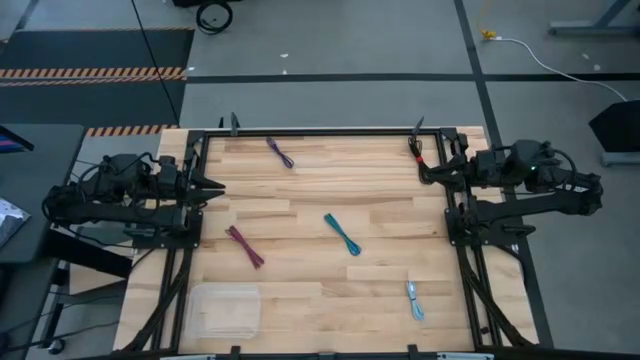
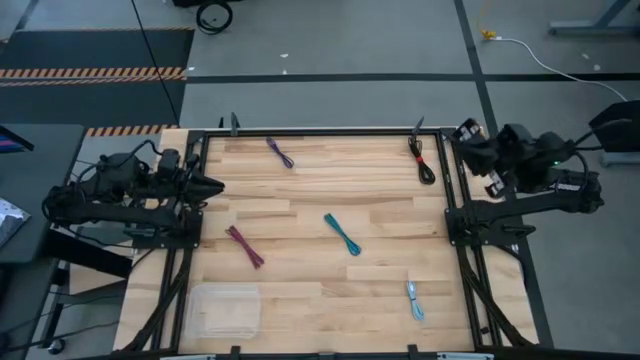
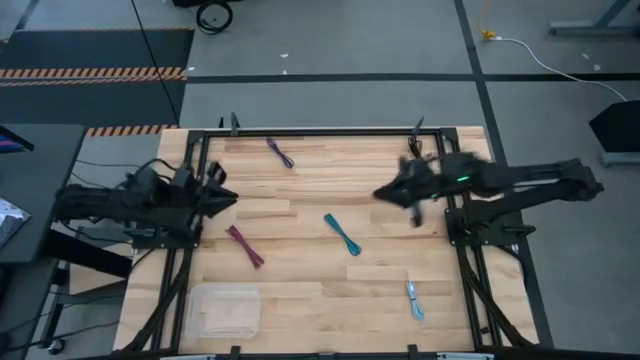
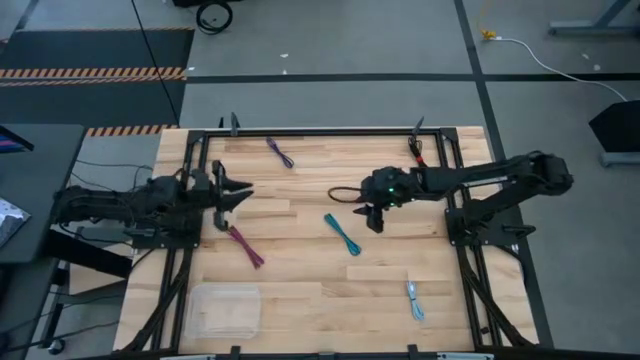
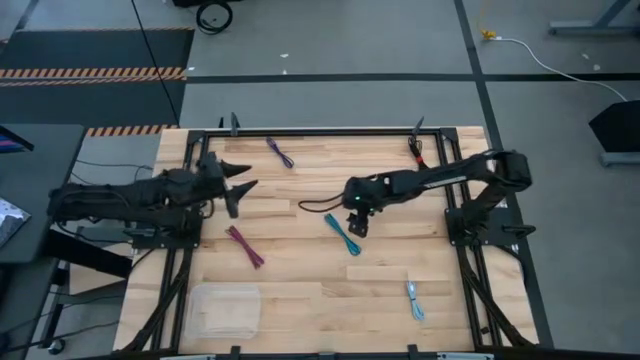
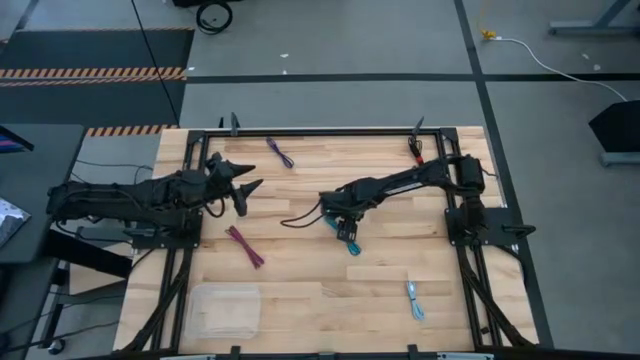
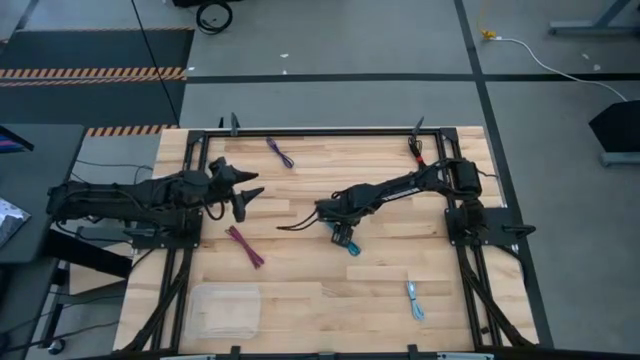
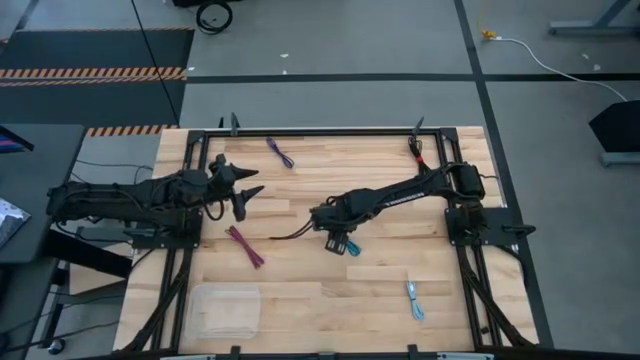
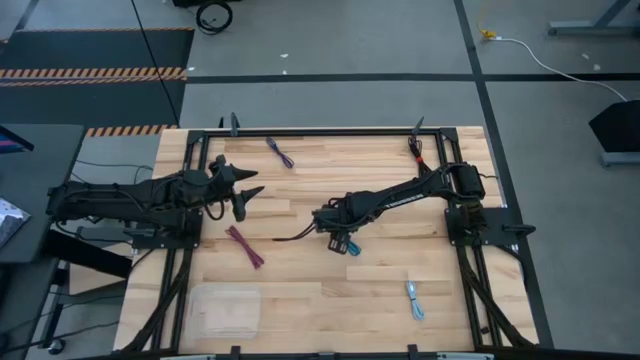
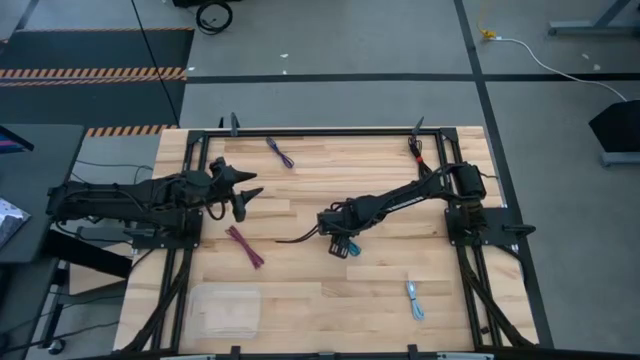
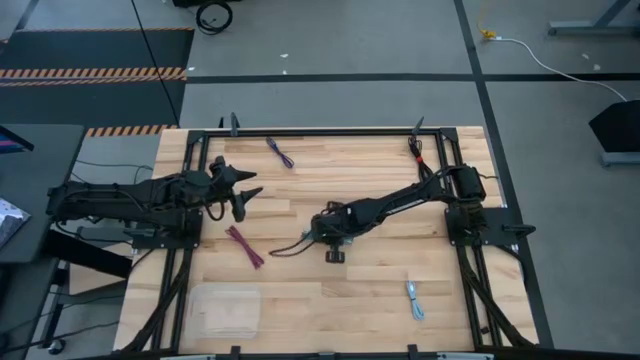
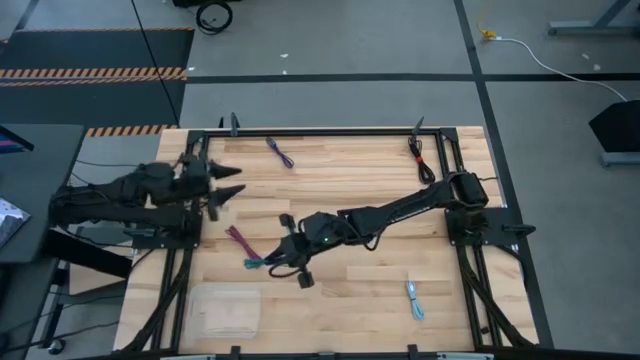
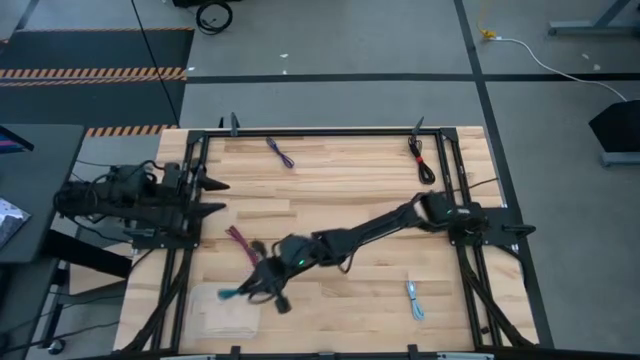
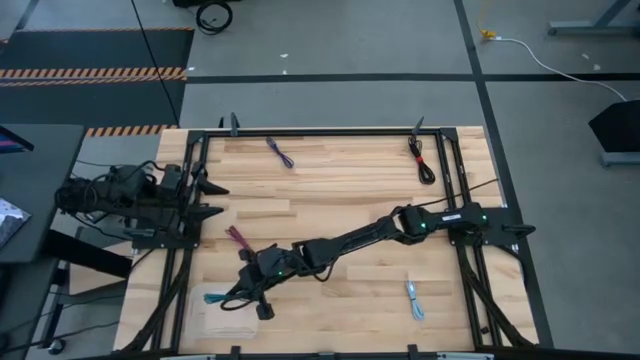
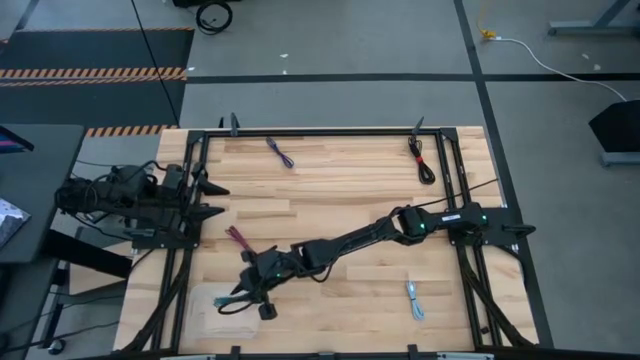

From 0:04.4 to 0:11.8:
Task: Pick and place USB-C Cables
Put the blue charger cable into the transparent bin

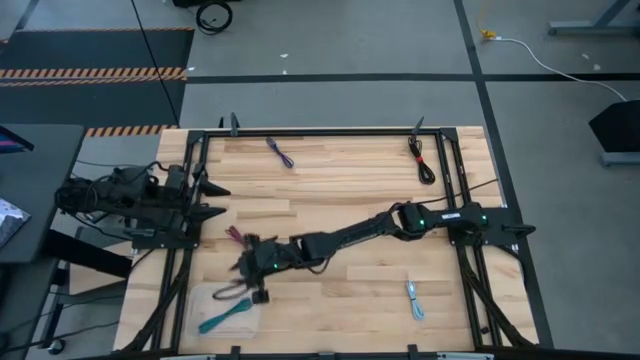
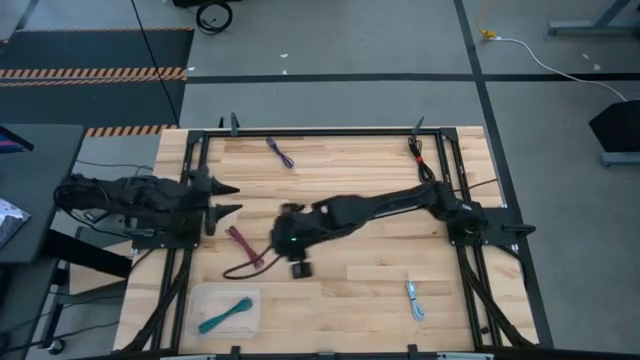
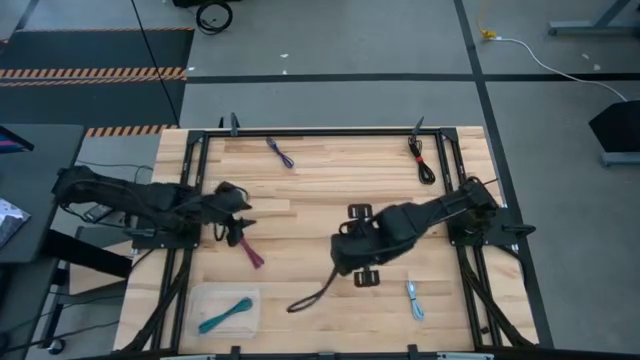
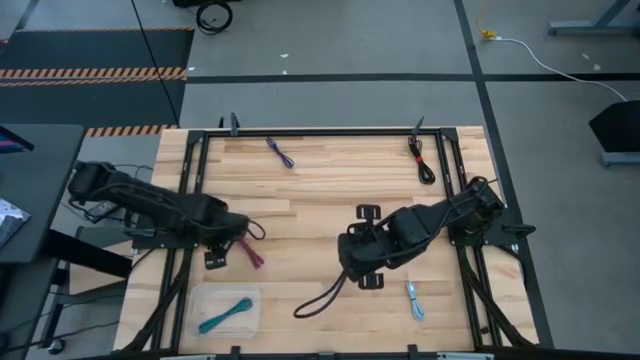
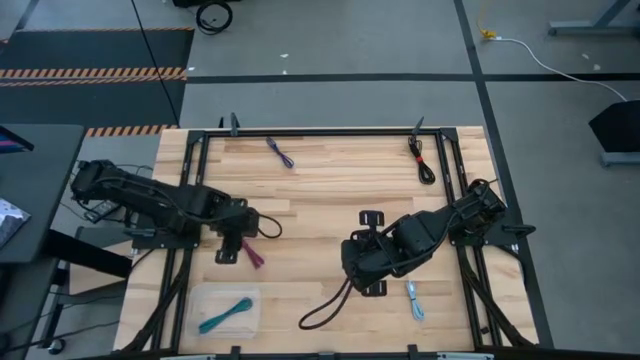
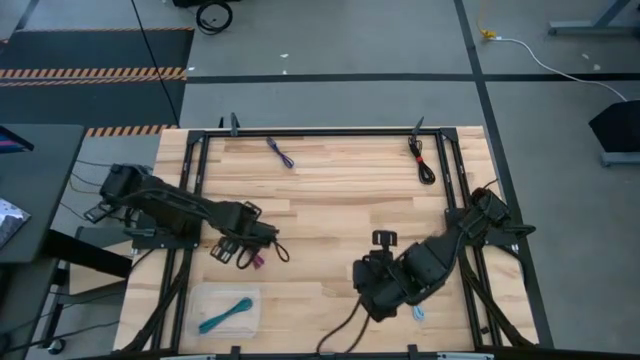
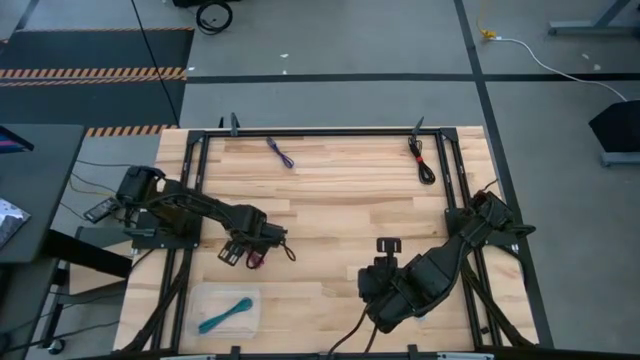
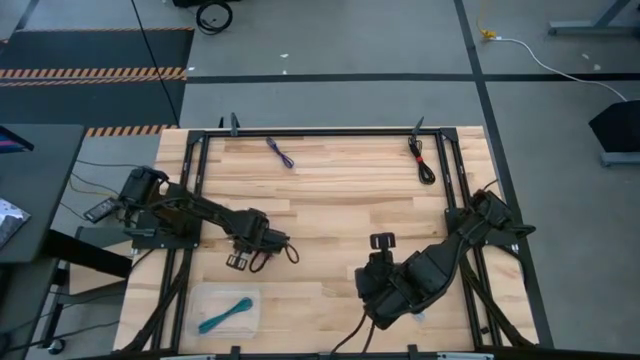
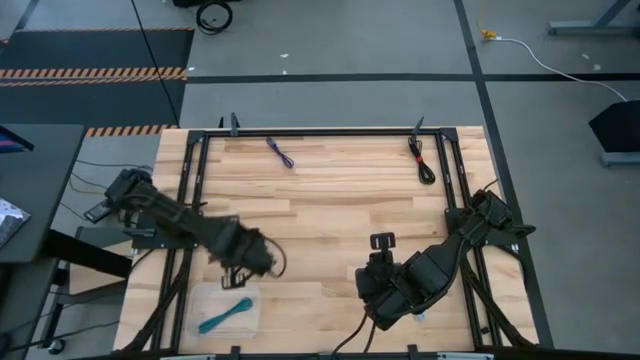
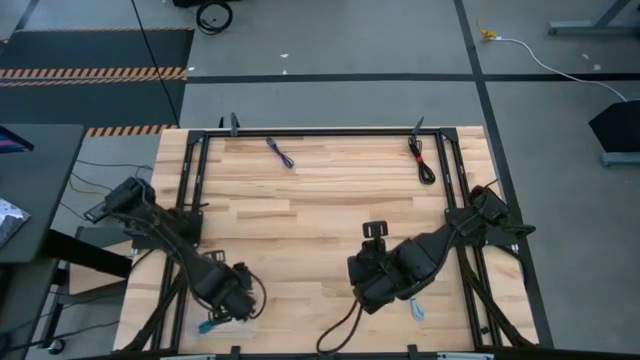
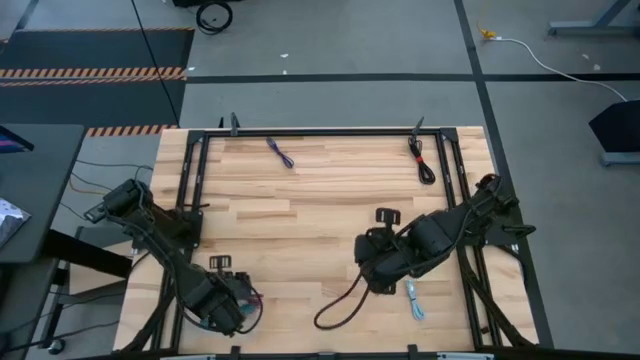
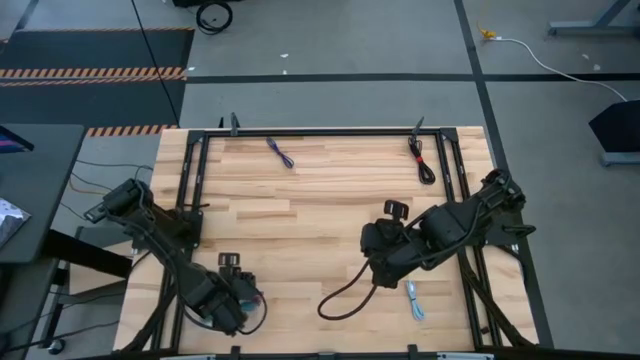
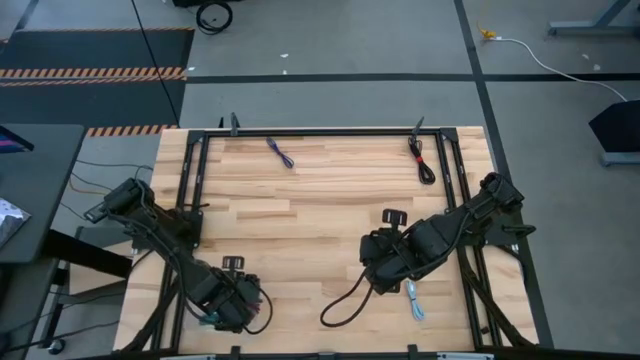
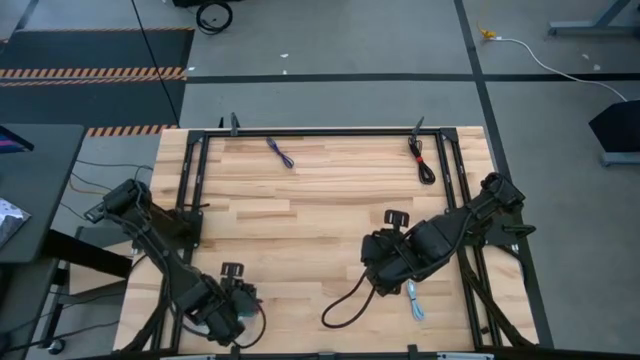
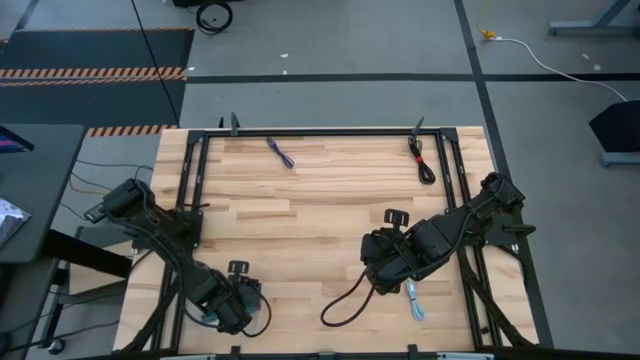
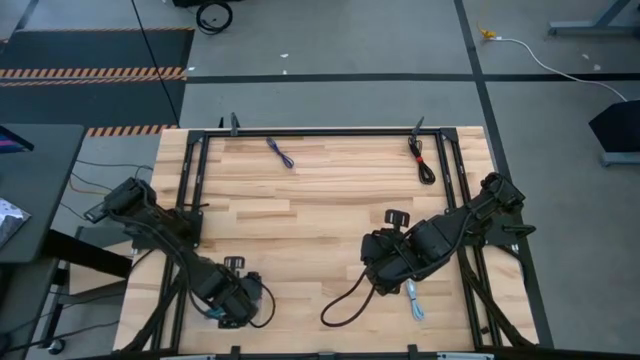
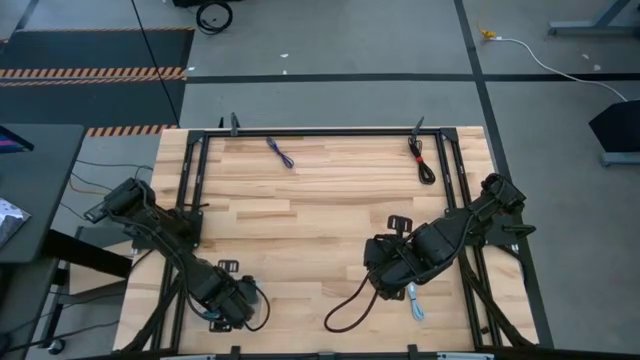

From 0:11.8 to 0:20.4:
Put the red charger cable into the transparent bin

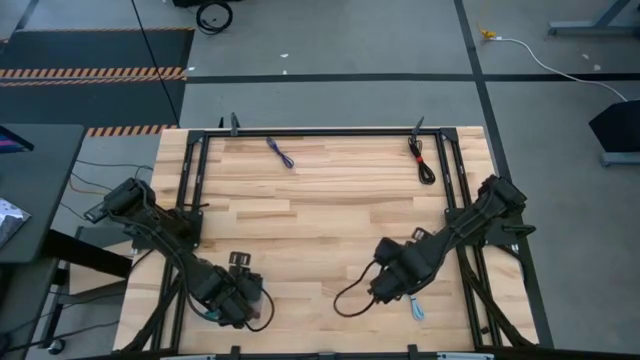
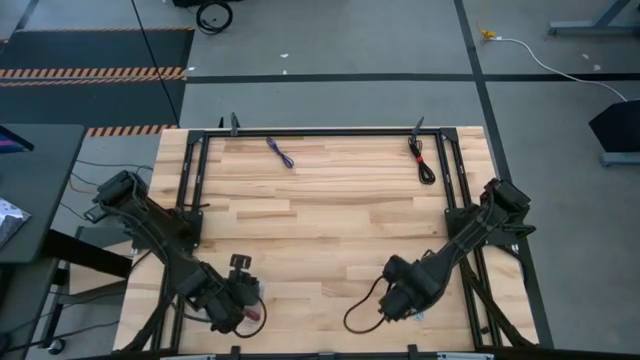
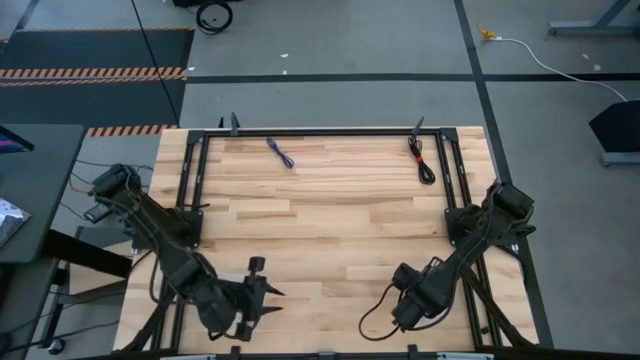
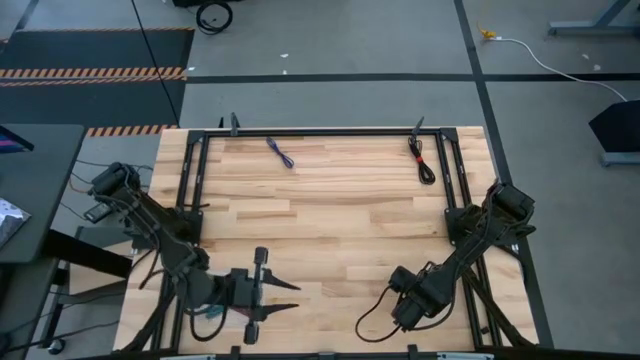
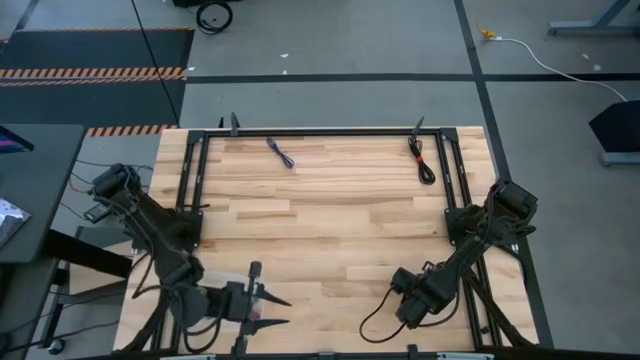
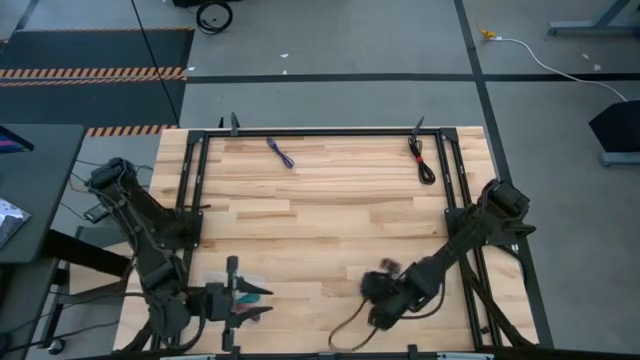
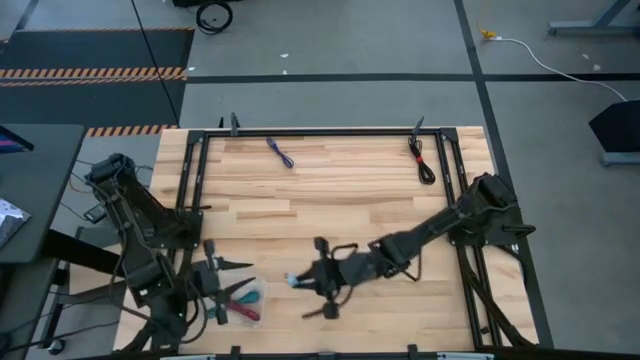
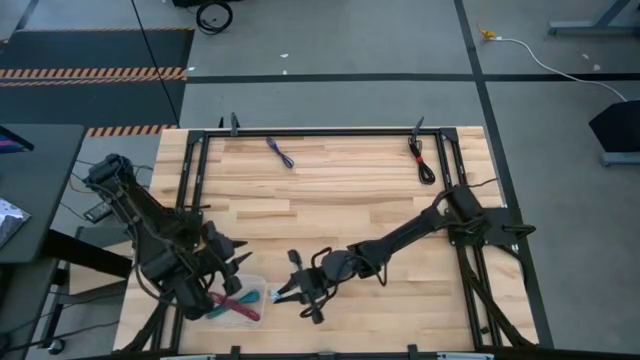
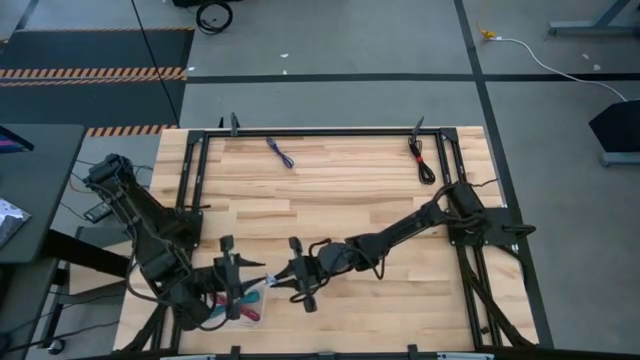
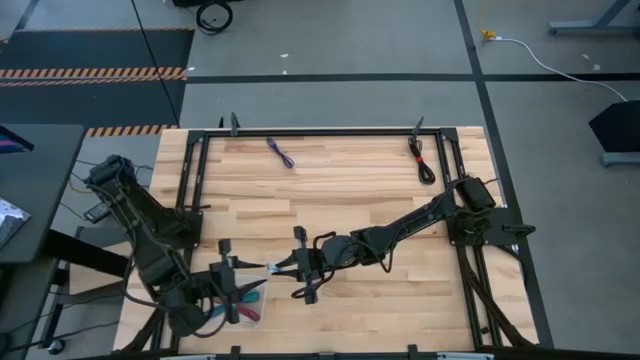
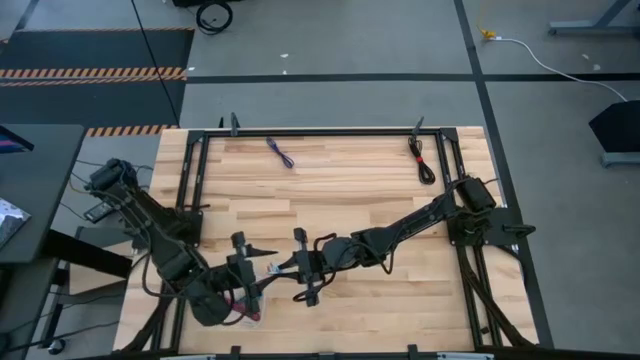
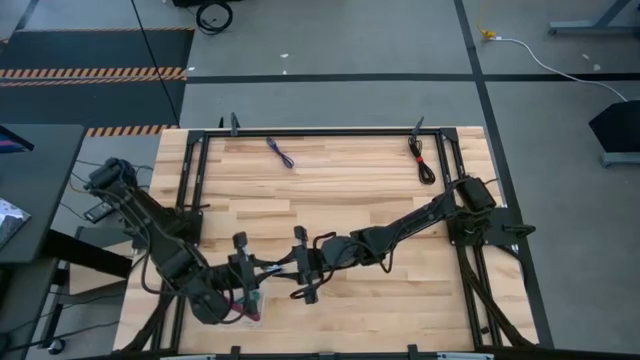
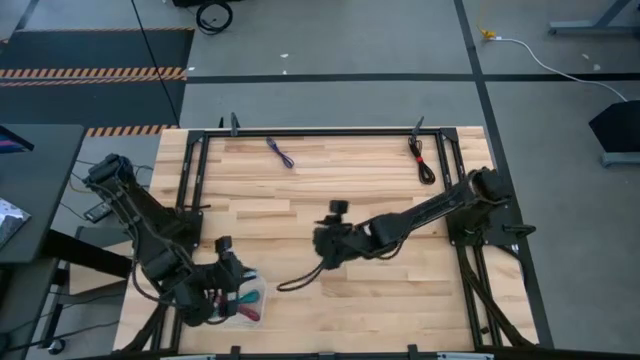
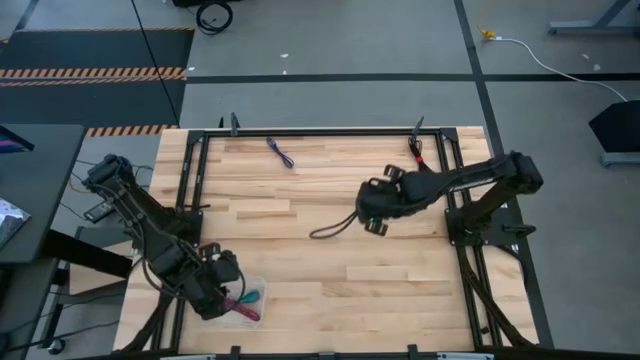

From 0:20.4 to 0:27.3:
Put the white charger cable into the transparent bin
